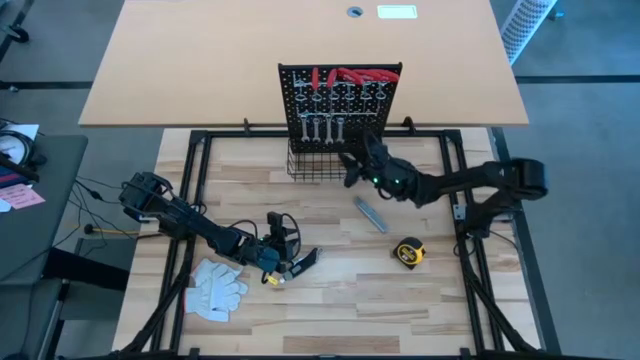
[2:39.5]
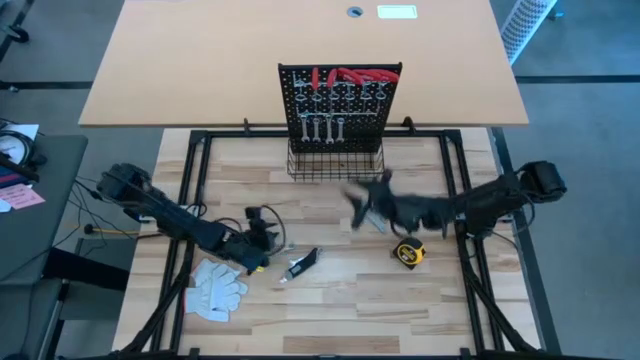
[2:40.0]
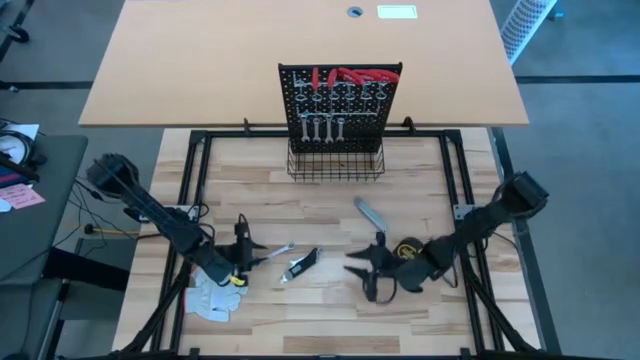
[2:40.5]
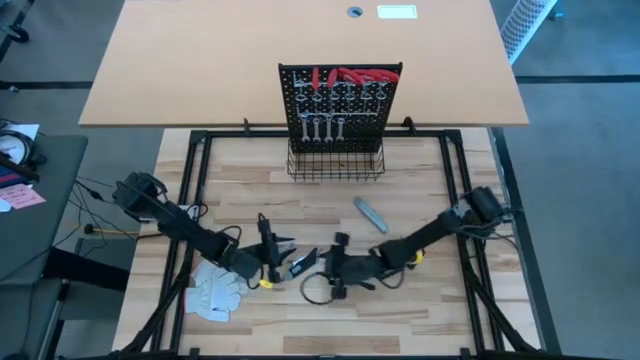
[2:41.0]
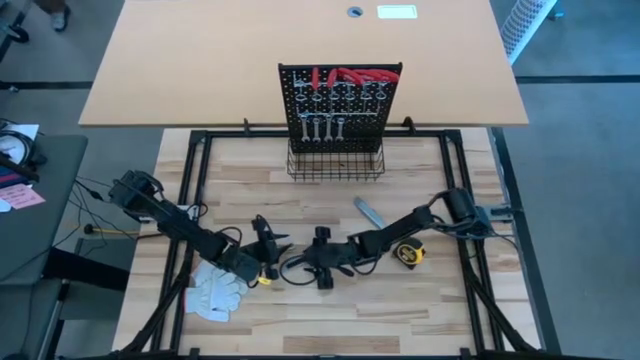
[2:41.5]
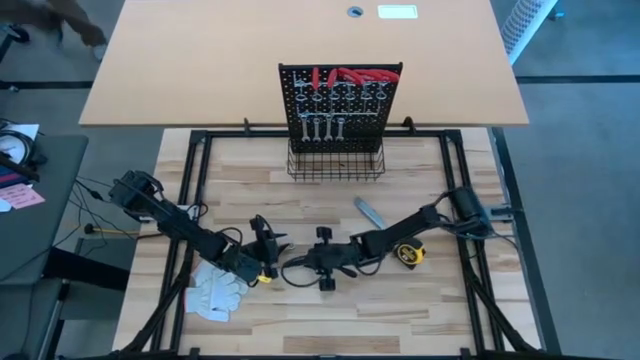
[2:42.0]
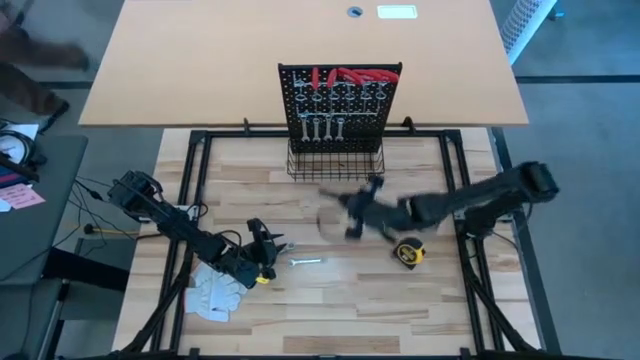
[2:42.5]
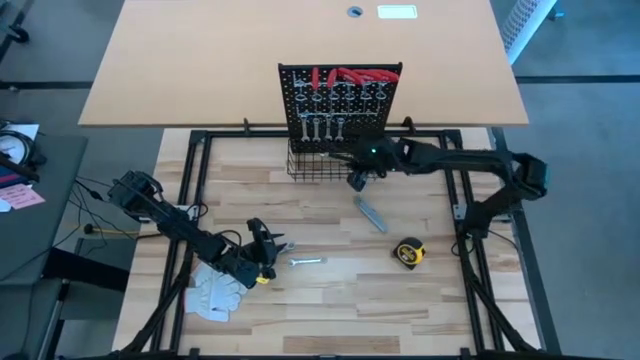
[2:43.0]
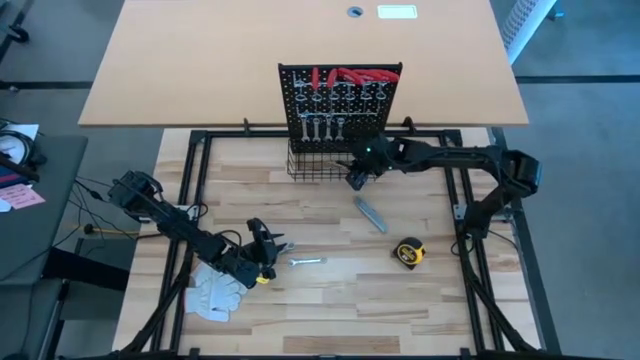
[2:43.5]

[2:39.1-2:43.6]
Task: Hang tools onto peg board
Put the black box cutter on the wire basket on the pegboard

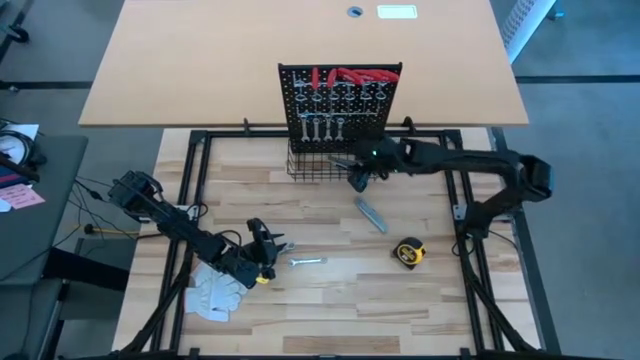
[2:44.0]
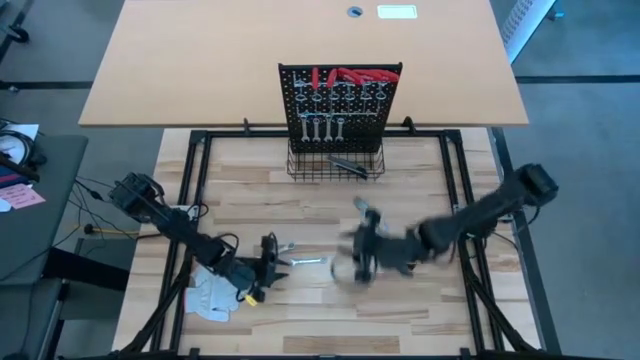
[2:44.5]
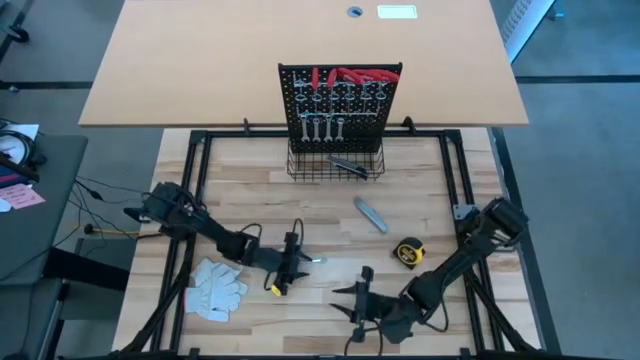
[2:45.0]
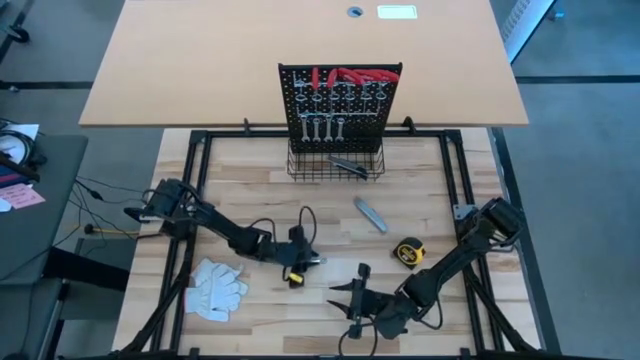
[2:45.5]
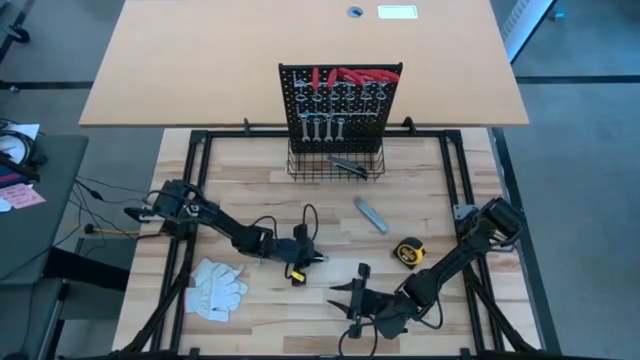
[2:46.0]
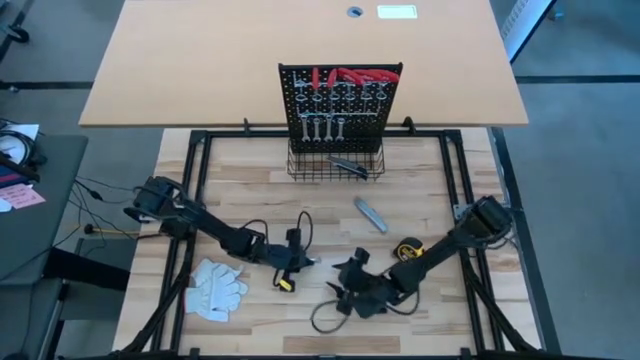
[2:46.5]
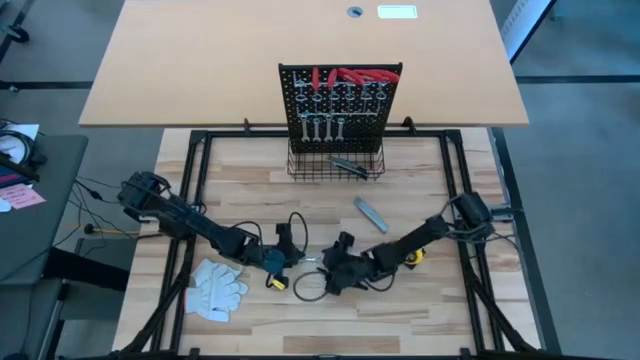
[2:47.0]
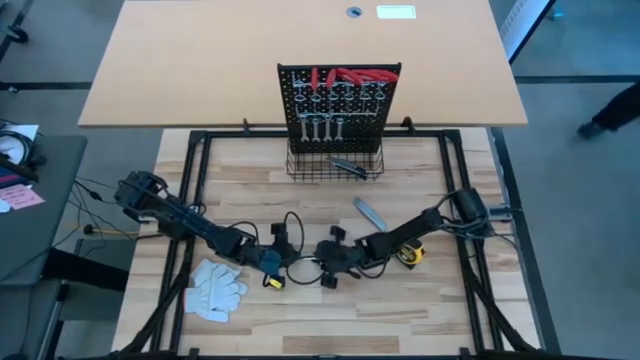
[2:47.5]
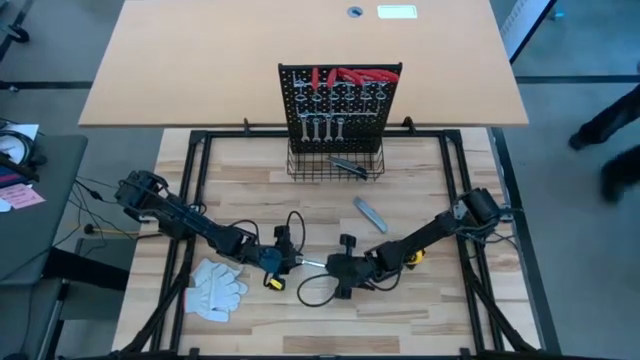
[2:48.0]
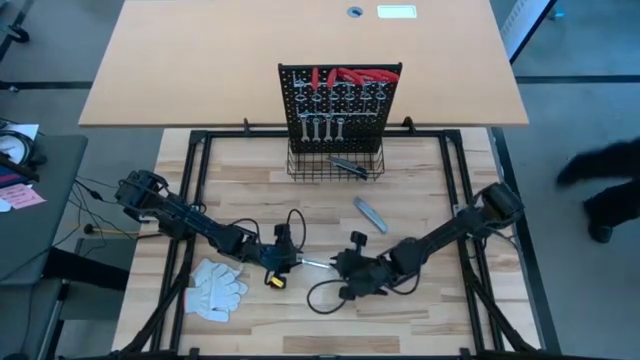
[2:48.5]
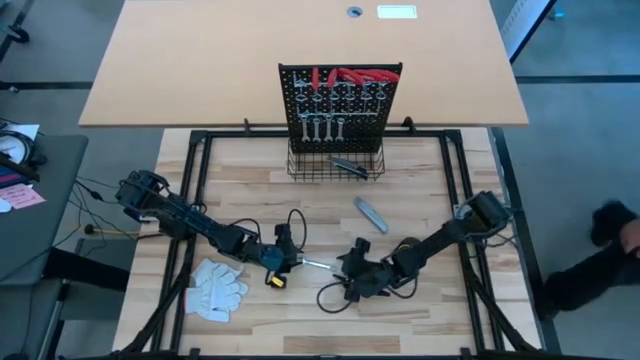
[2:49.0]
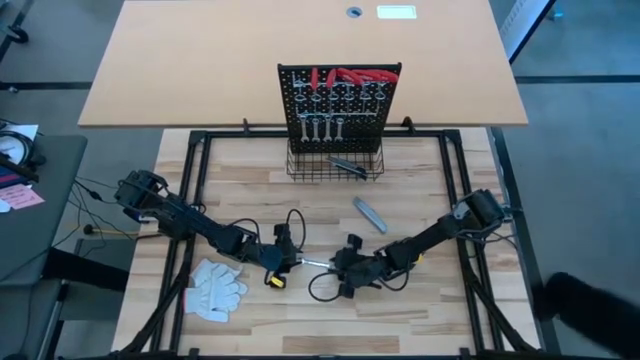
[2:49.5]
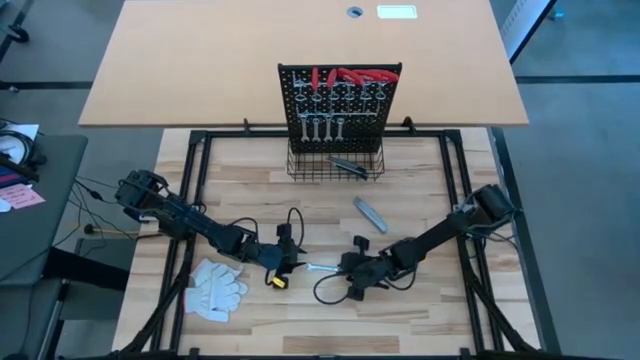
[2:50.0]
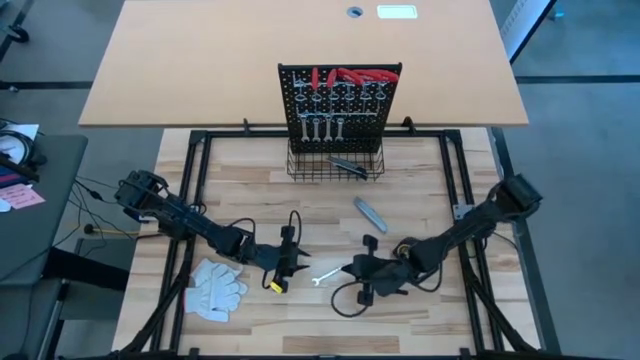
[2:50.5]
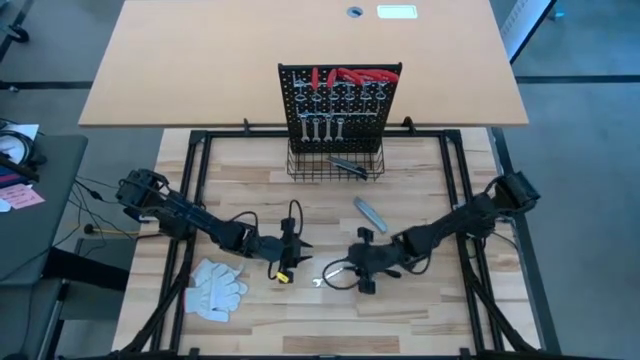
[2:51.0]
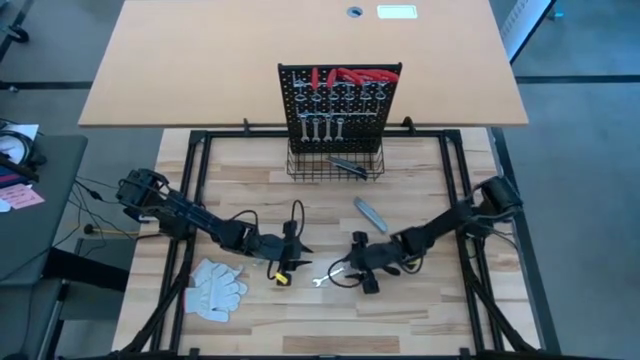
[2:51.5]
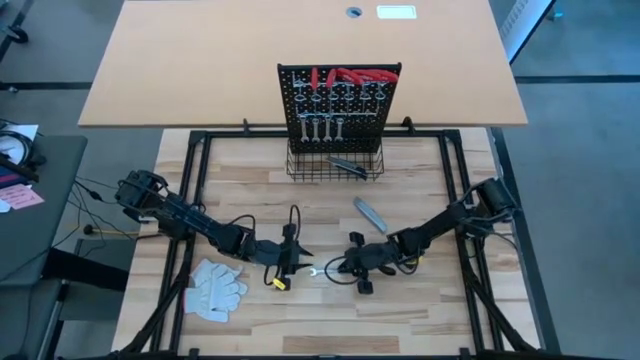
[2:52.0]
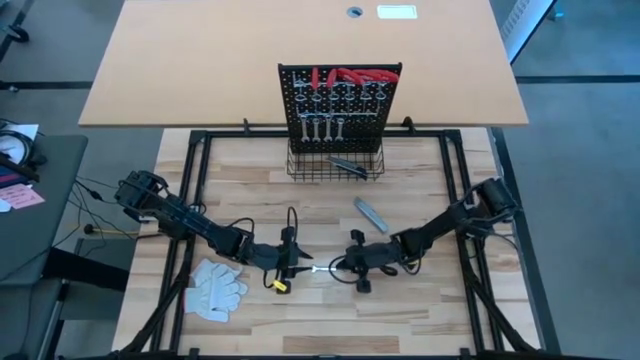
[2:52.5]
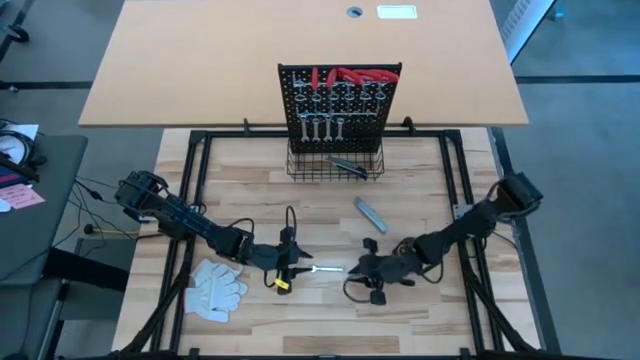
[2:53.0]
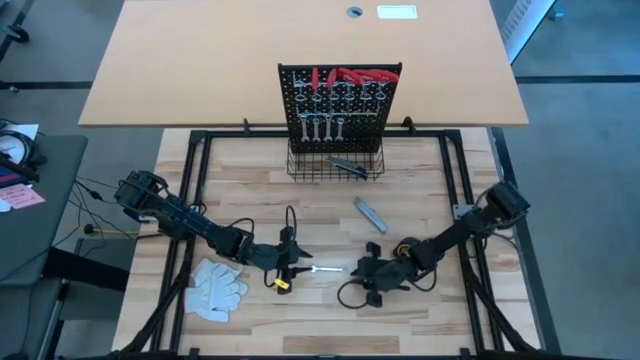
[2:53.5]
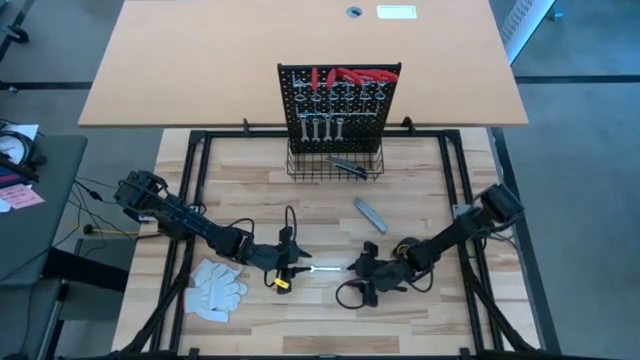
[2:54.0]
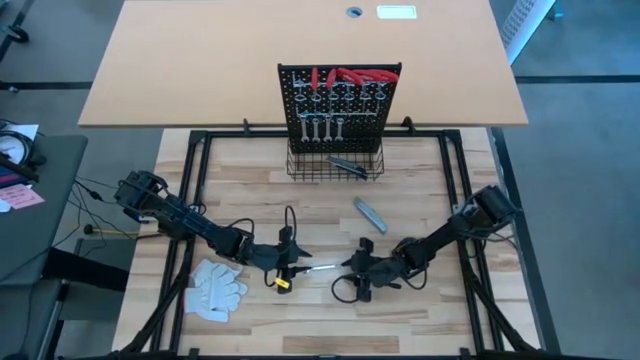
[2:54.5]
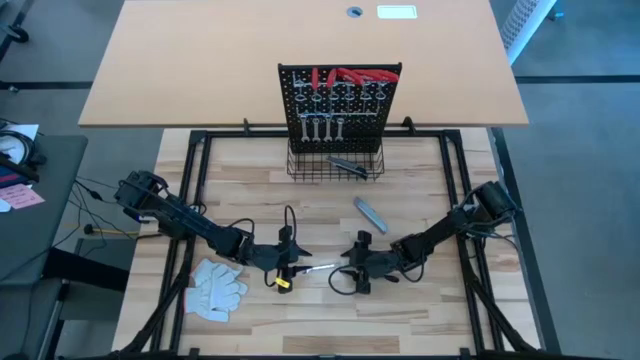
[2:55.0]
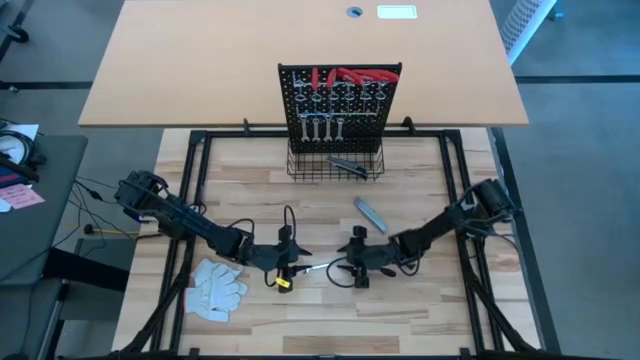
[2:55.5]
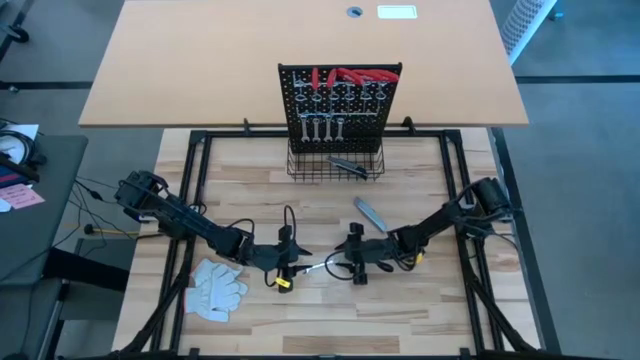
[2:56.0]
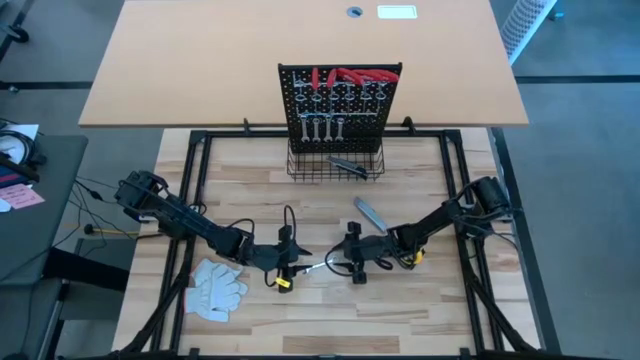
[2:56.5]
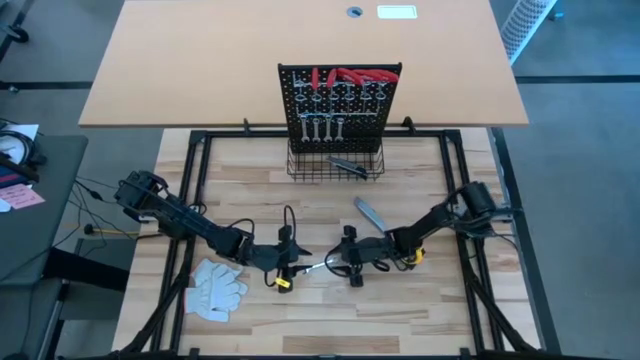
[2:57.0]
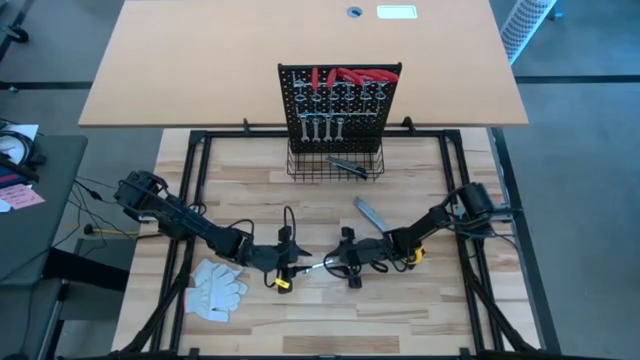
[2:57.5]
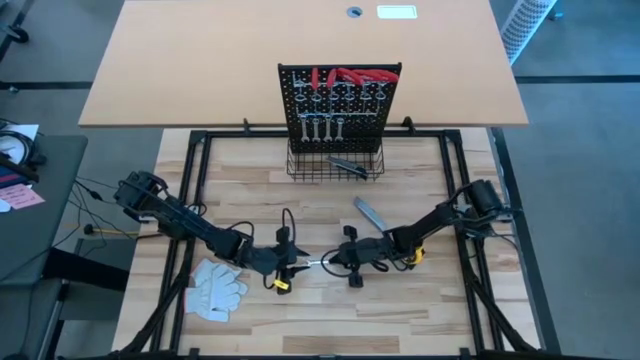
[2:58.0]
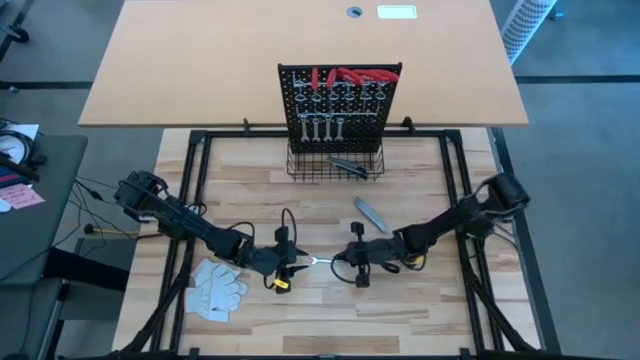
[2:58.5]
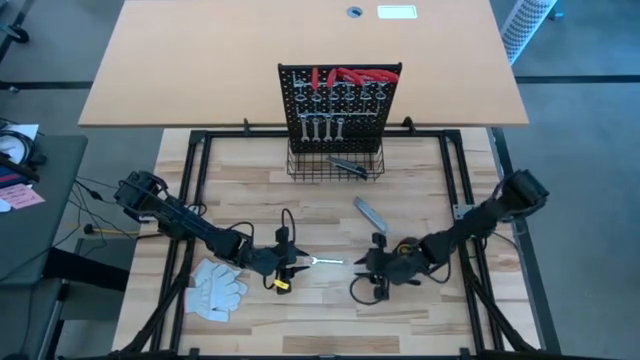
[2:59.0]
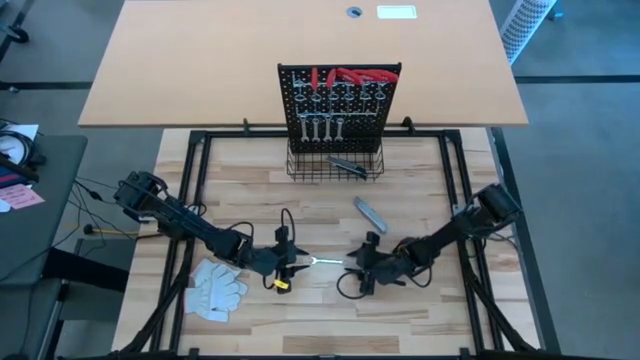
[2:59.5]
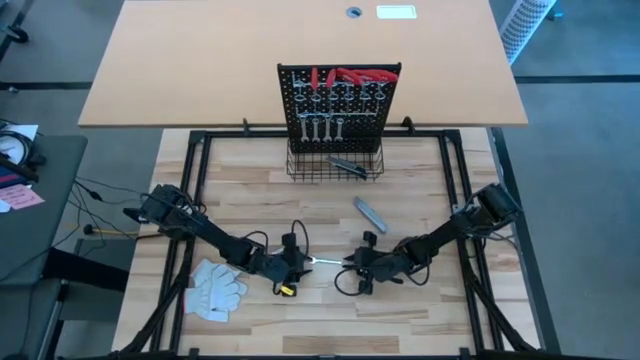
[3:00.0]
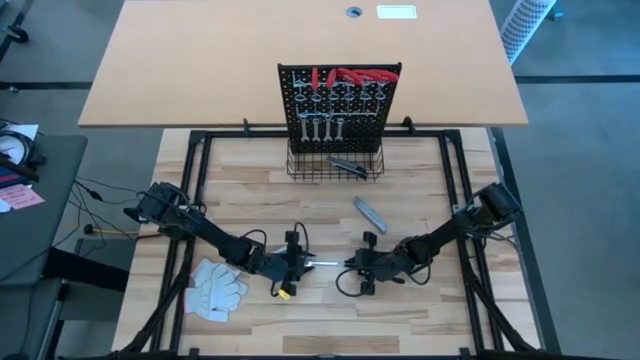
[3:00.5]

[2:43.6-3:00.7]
Hang the silver wrench on the pegboard
